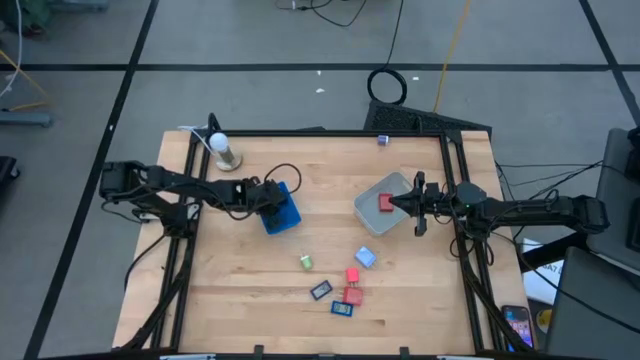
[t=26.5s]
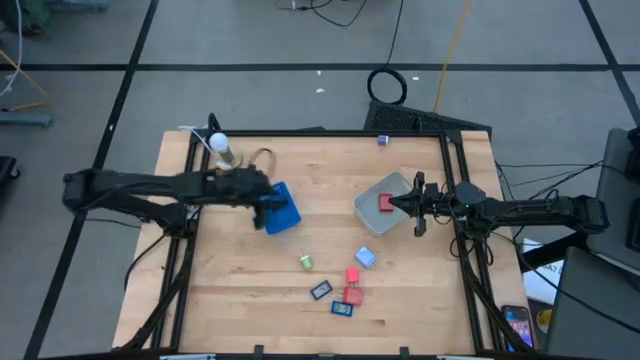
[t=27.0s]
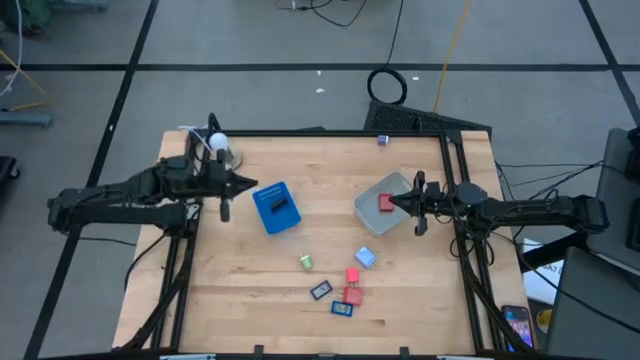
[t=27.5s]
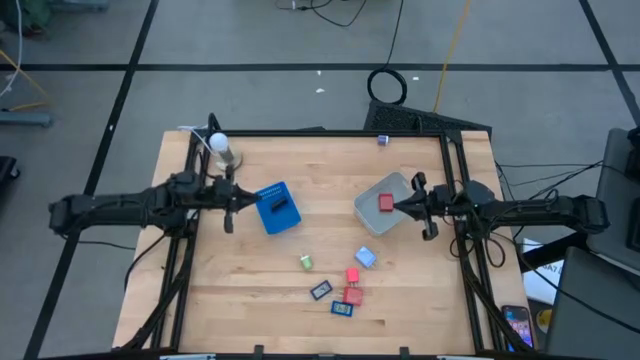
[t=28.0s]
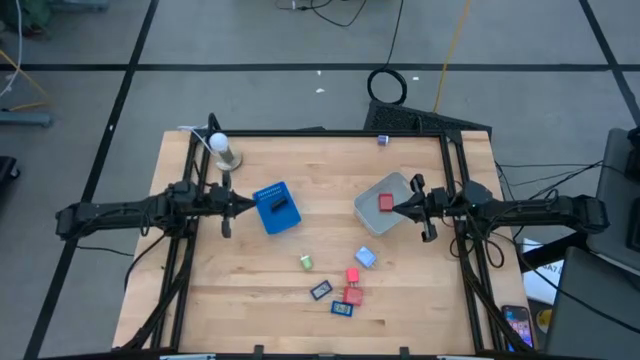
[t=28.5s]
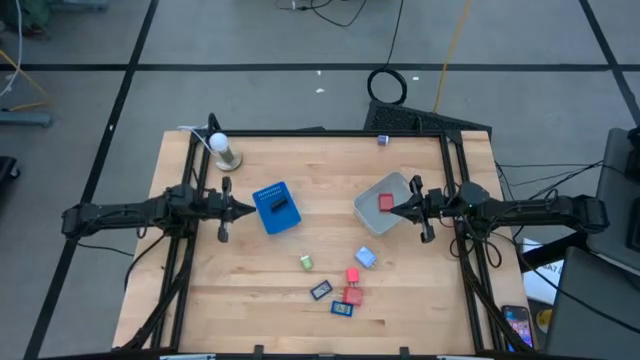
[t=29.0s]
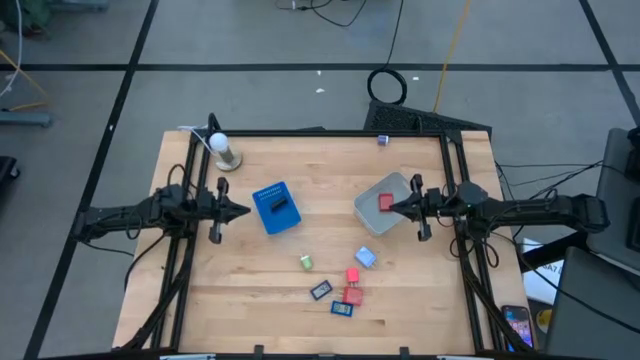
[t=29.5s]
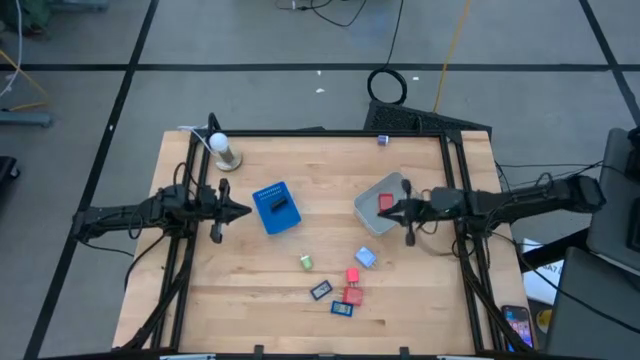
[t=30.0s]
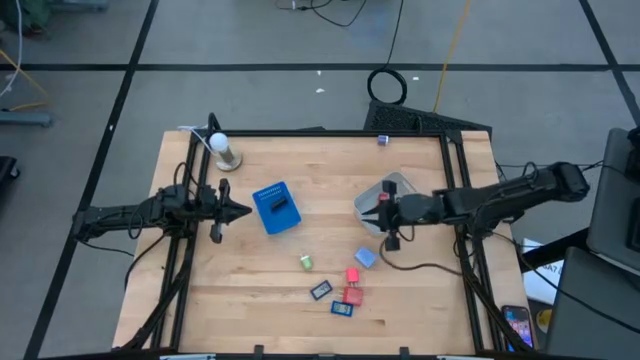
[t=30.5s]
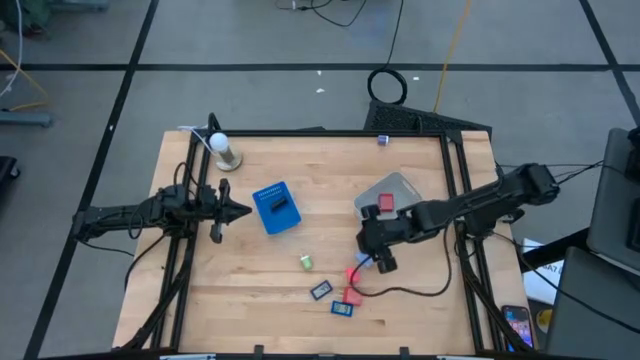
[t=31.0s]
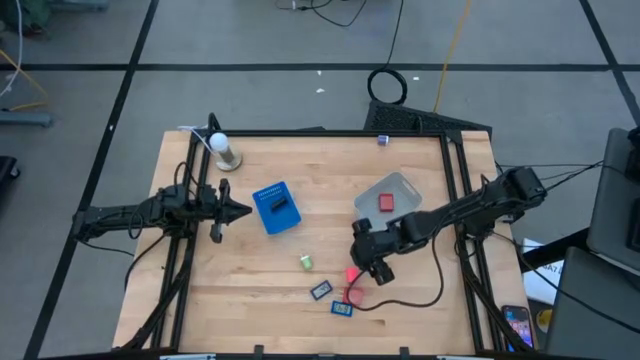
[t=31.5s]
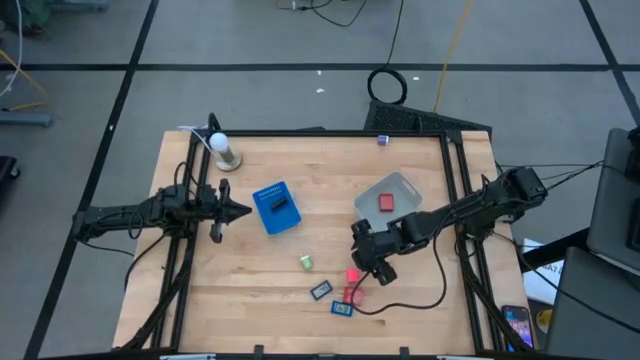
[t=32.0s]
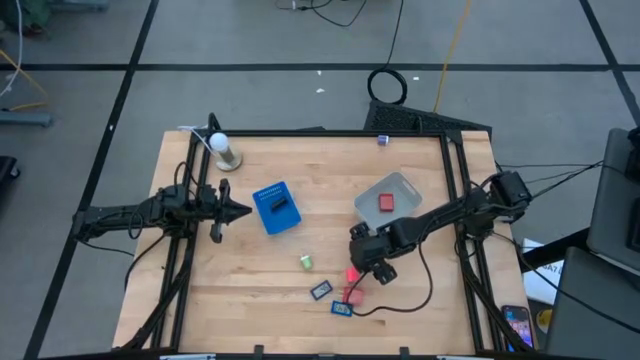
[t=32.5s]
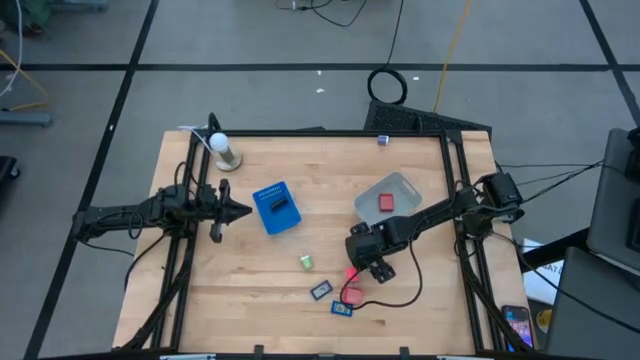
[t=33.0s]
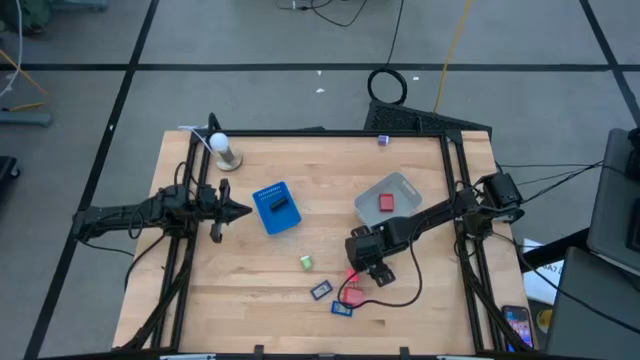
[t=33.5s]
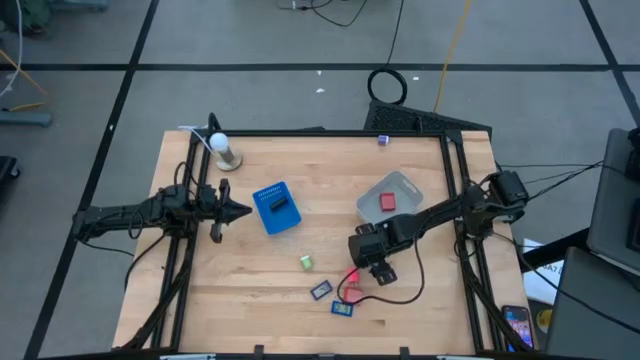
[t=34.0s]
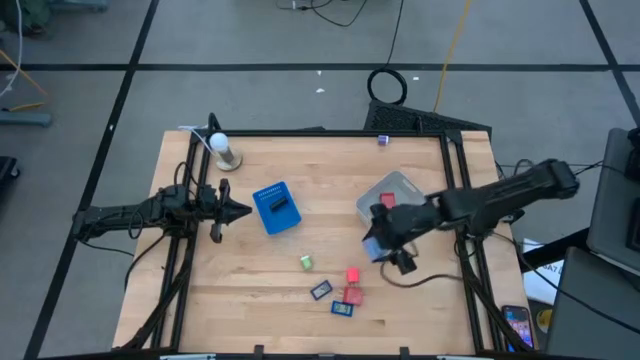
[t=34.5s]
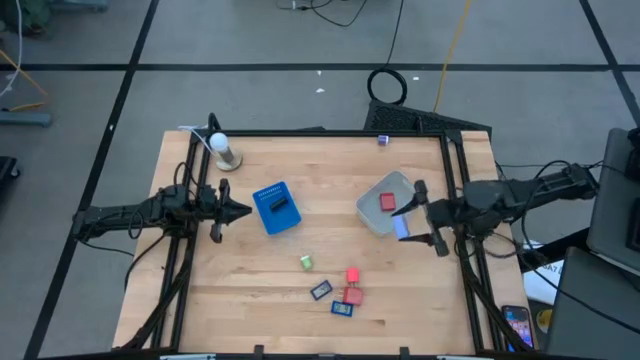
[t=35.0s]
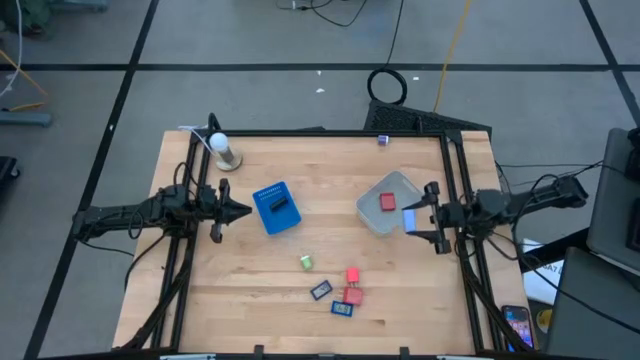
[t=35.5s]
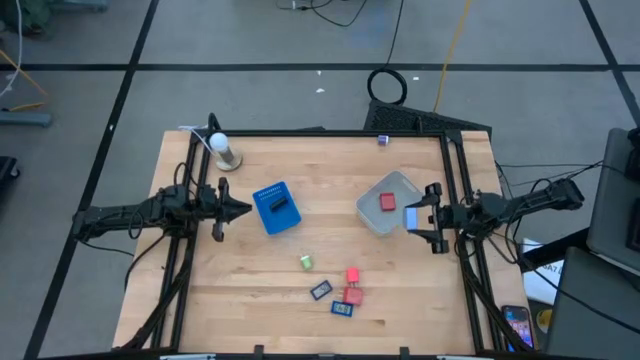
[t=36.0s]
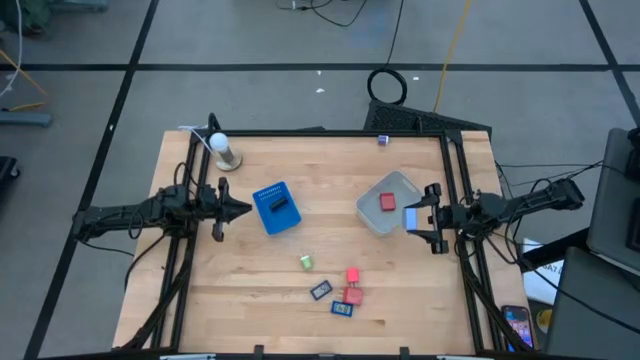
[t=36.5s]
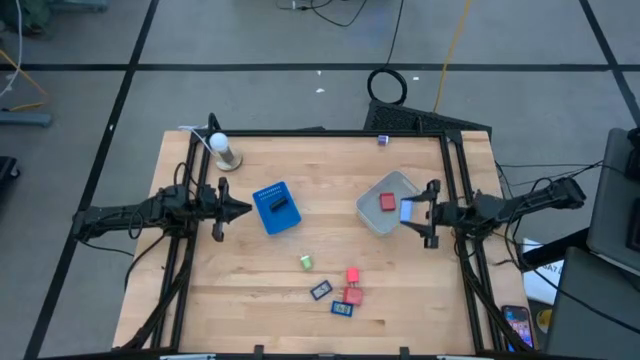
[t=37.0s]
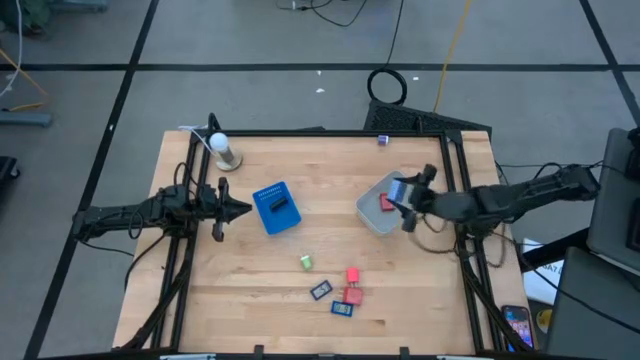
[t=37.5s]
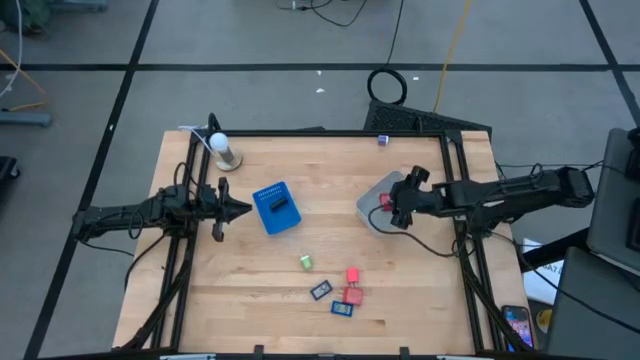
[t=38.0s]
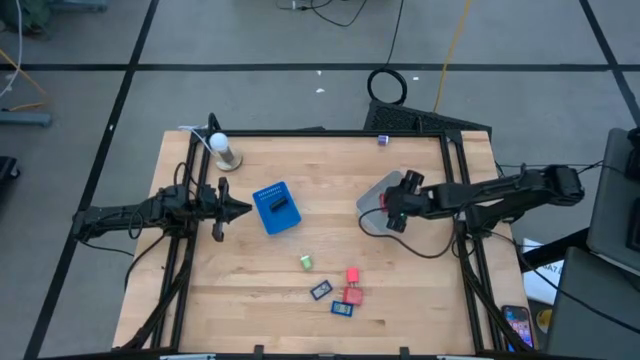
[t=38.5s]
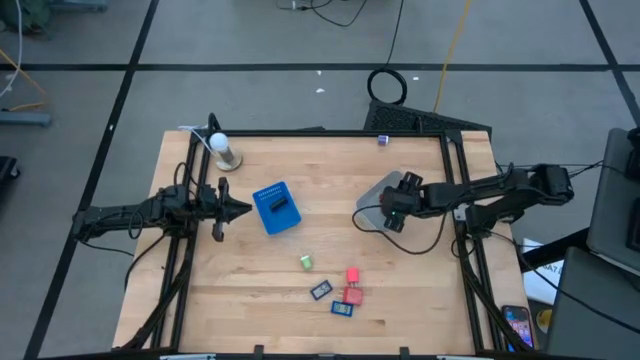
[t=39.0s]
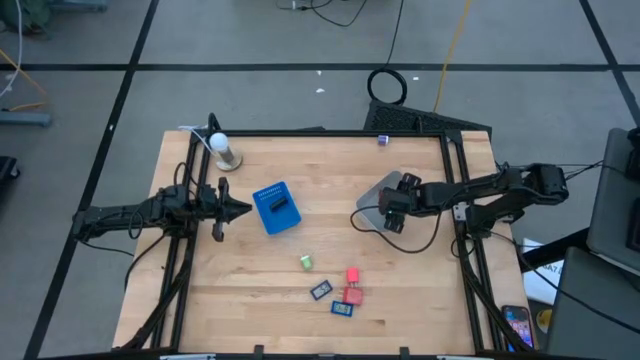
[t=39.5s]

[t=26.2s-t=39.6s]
Task: Pick & Place Office items
Put the light blue charger adapter into the grey bin

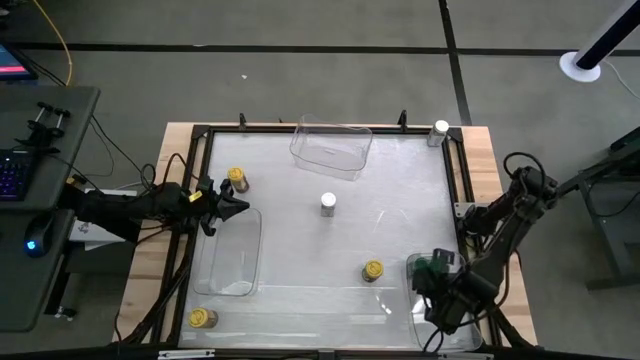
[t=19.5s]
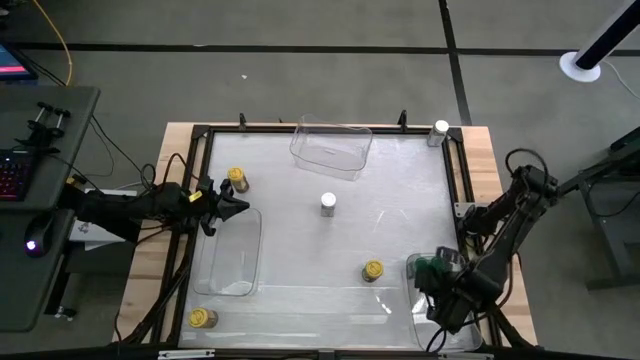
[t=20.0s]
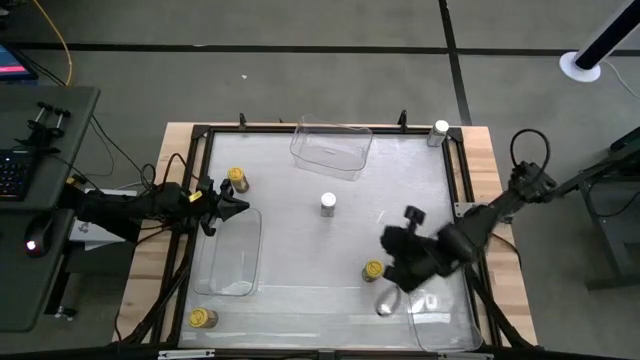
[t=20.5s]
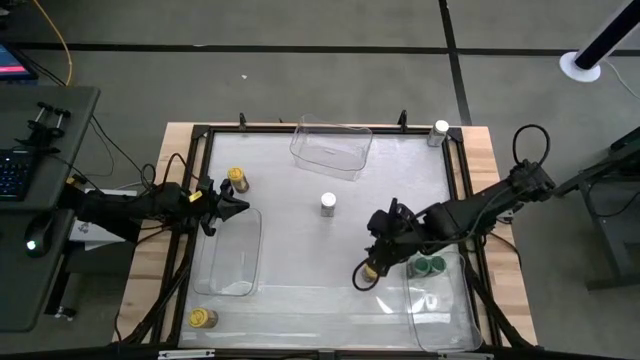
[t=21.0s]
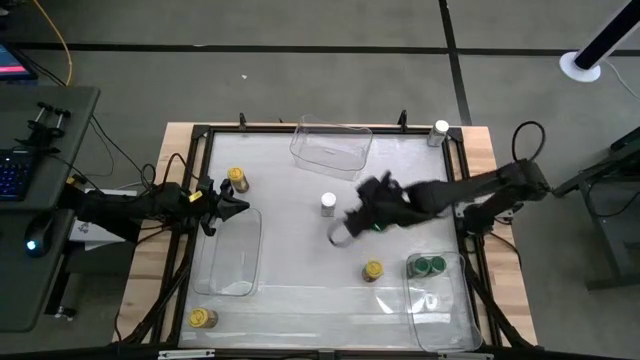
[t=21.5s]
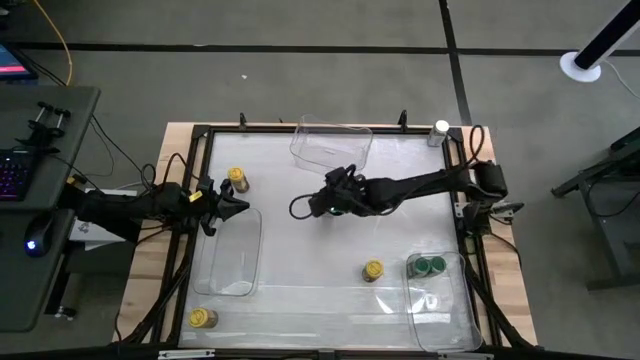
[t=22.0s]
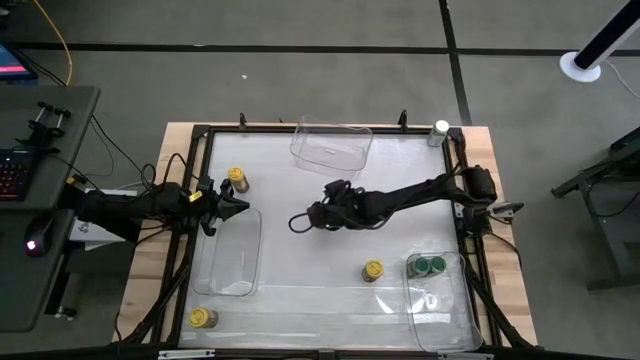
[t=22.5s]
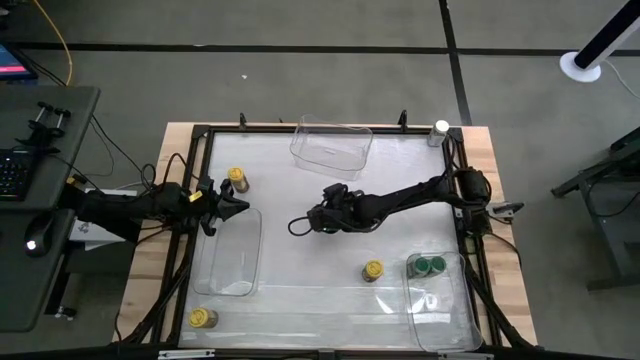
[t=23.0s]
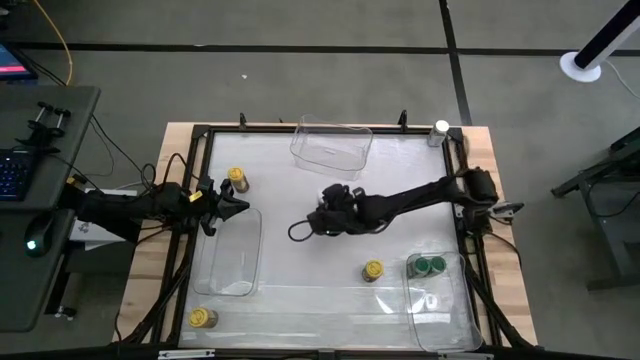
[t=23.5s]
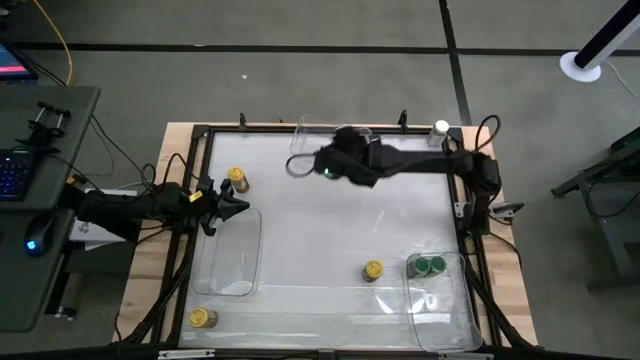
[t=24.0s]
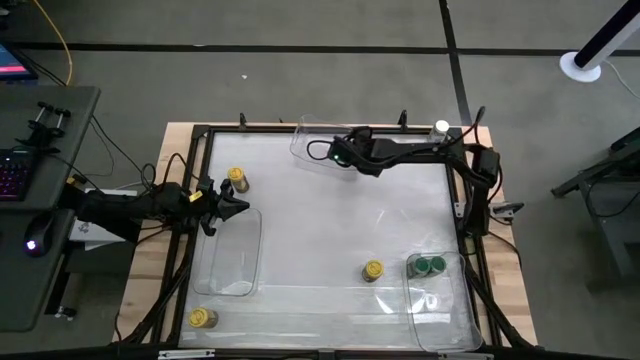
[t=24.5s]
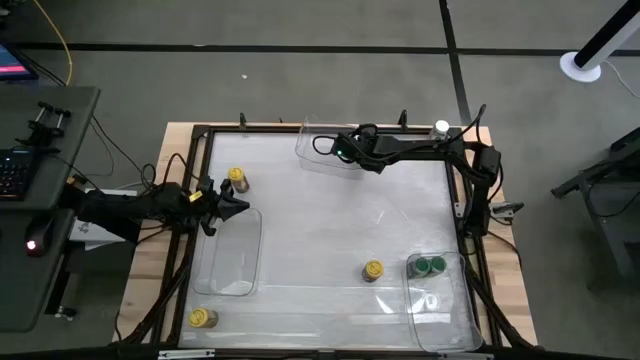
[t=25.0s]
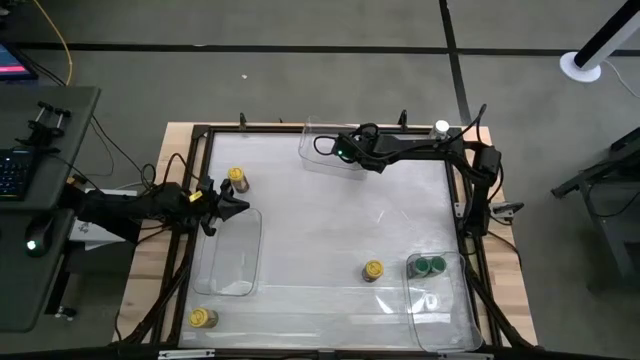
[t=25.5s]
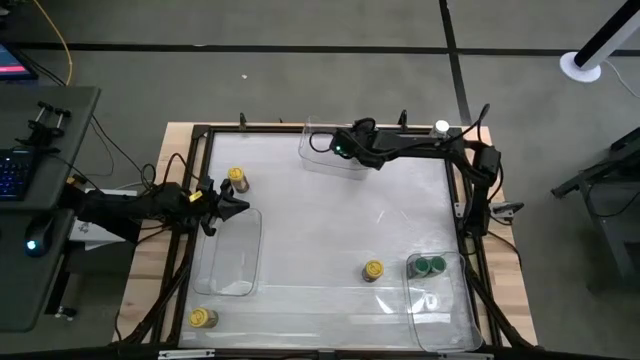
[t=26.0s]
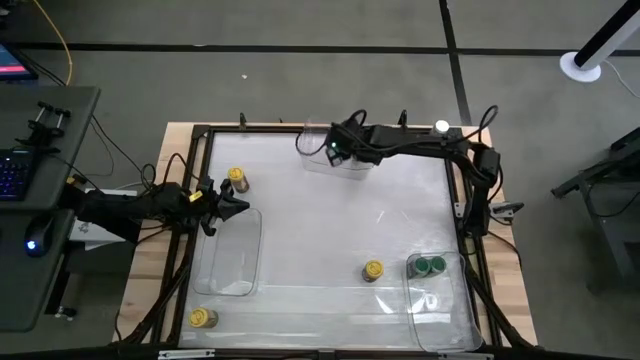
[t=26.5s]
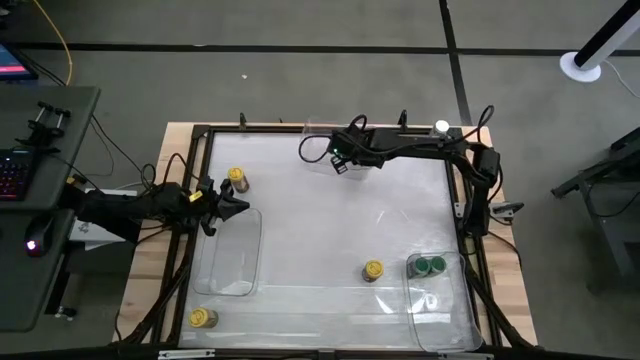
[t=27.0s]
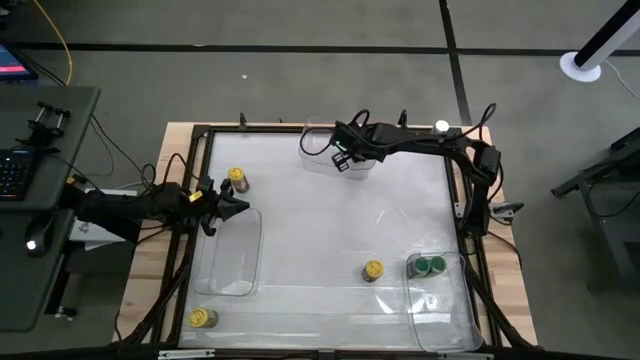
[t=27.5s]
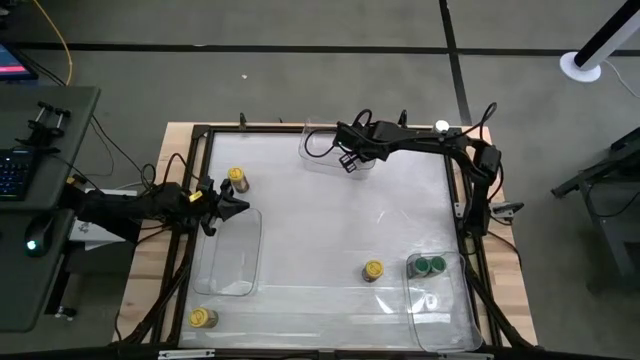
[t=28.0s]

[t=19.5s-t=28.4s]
Task: Sort spices by type
Put the bottom white seasoning bottle into the top transparent bin
